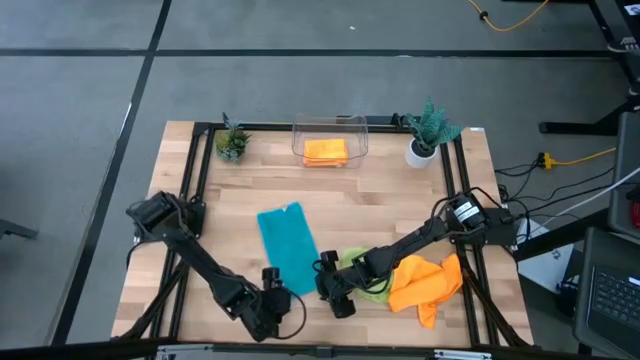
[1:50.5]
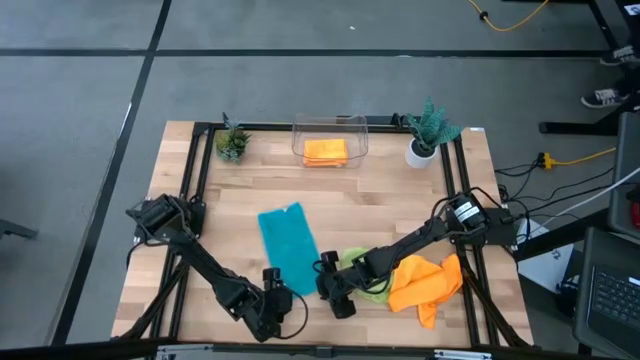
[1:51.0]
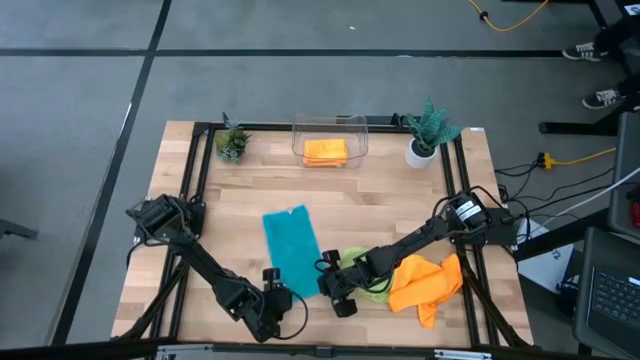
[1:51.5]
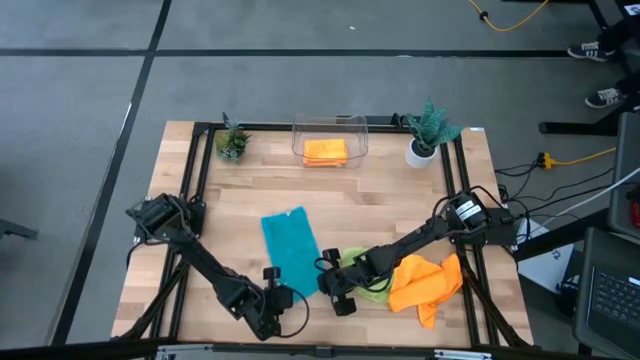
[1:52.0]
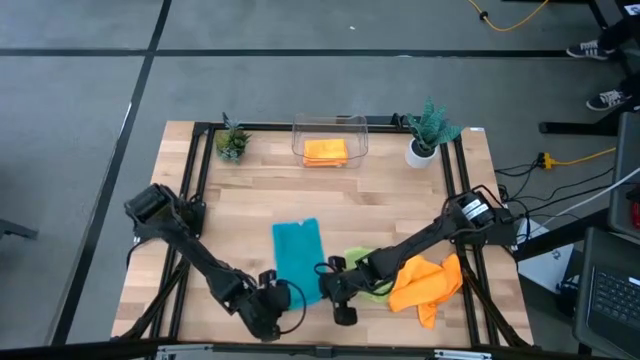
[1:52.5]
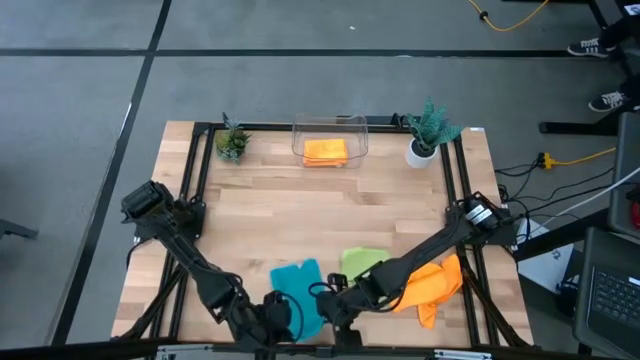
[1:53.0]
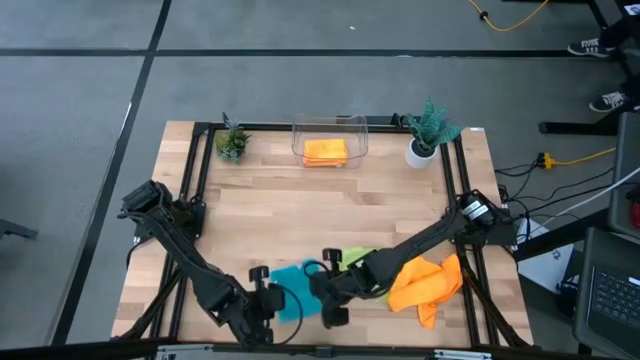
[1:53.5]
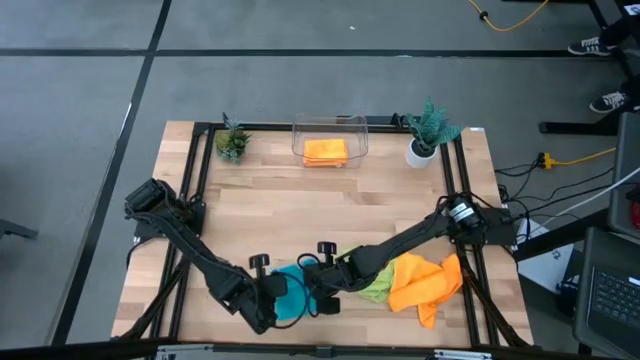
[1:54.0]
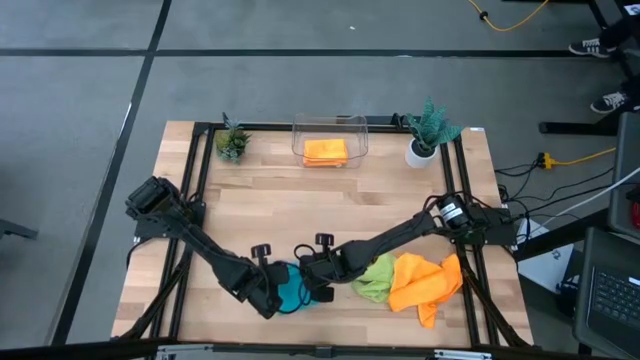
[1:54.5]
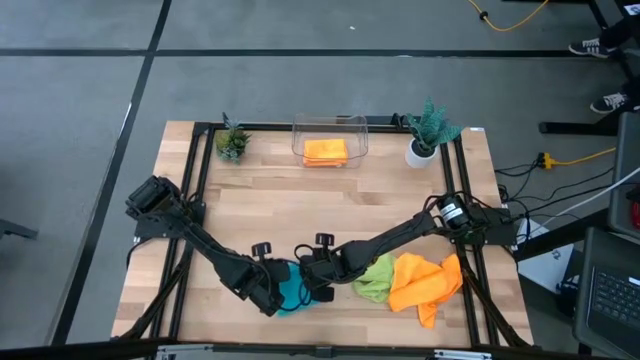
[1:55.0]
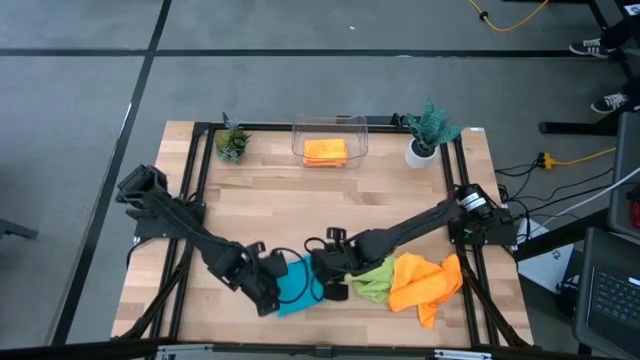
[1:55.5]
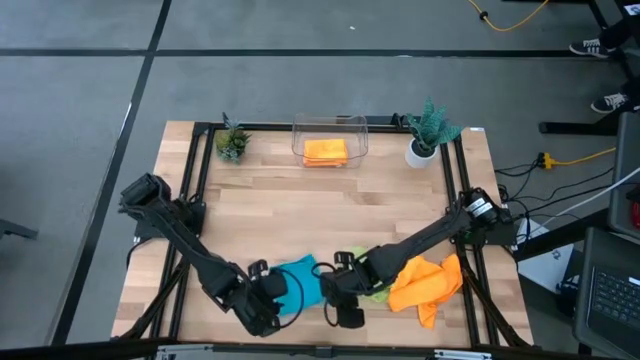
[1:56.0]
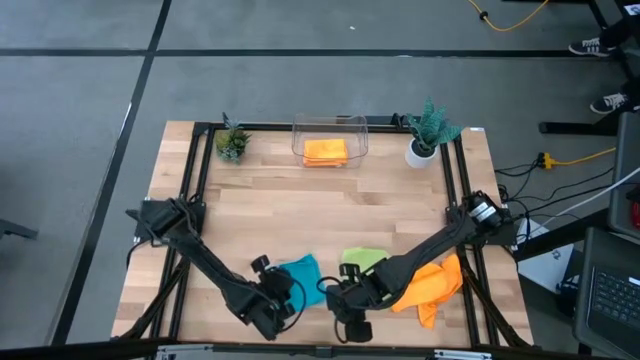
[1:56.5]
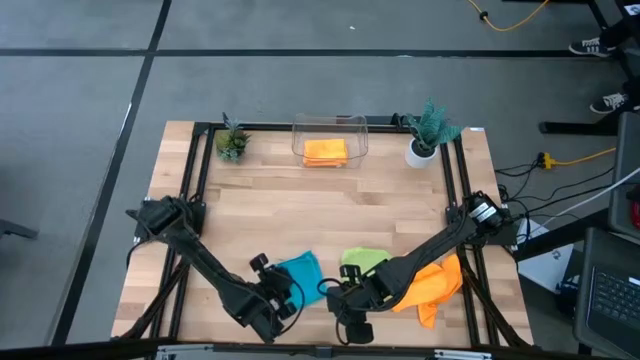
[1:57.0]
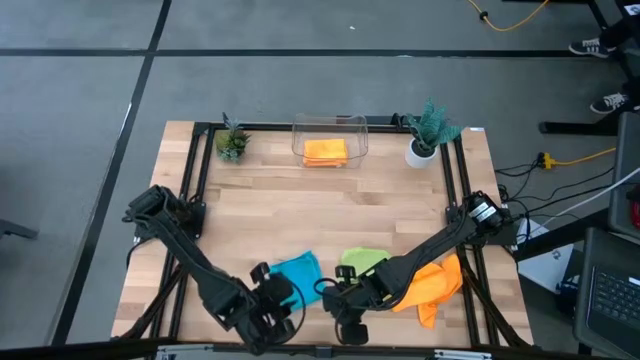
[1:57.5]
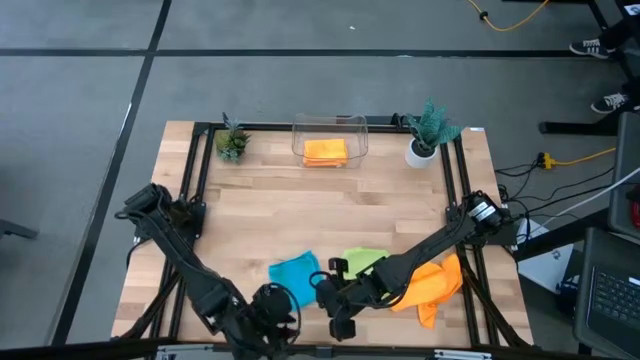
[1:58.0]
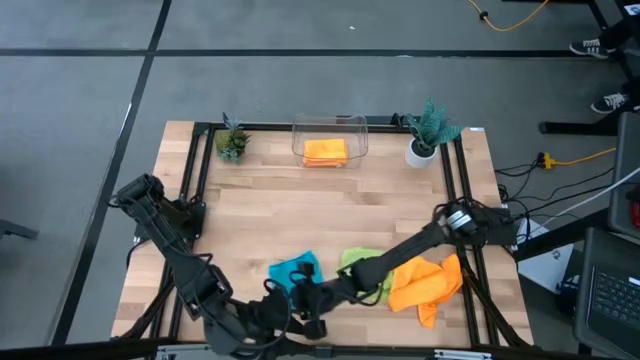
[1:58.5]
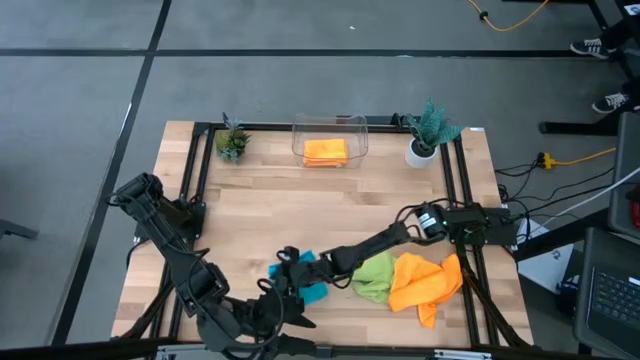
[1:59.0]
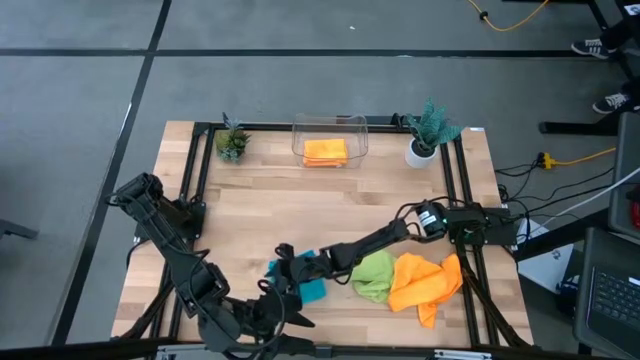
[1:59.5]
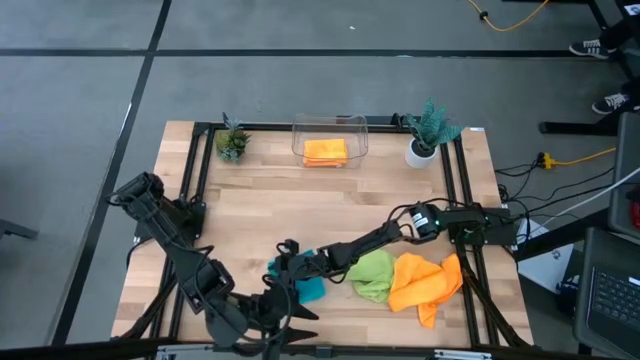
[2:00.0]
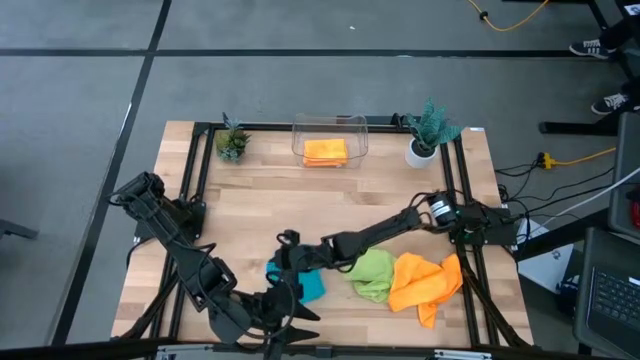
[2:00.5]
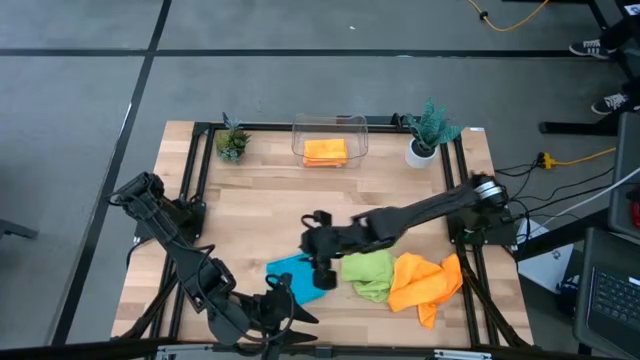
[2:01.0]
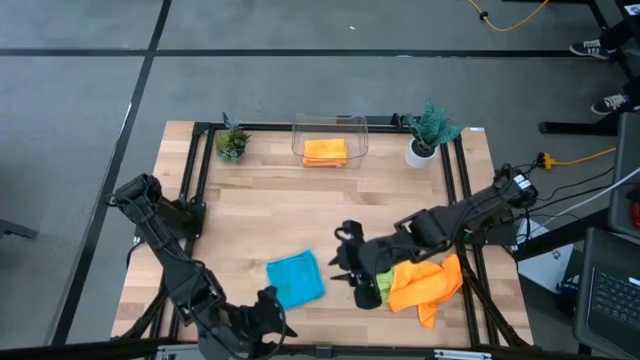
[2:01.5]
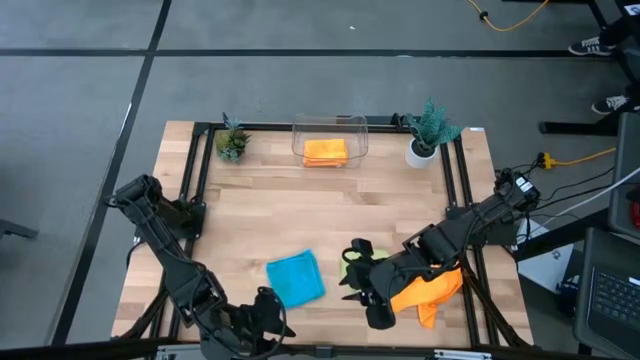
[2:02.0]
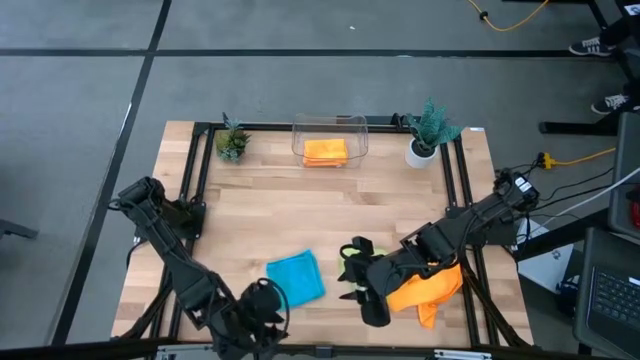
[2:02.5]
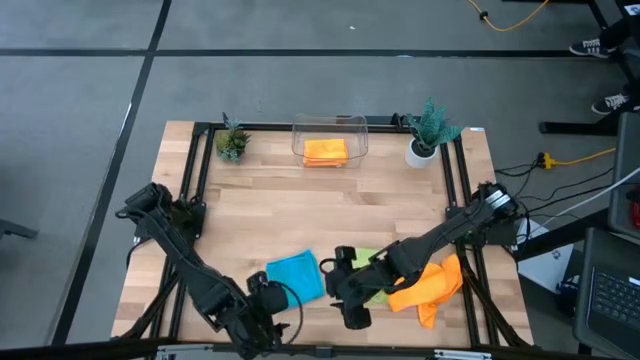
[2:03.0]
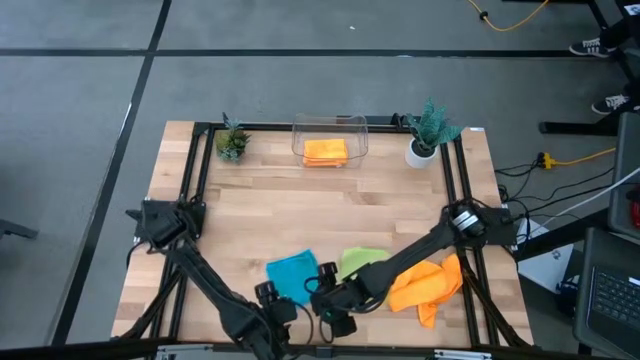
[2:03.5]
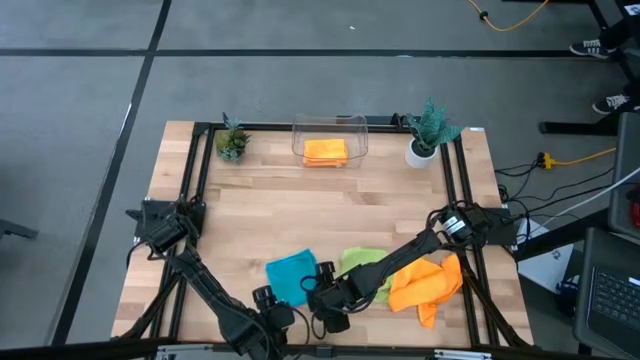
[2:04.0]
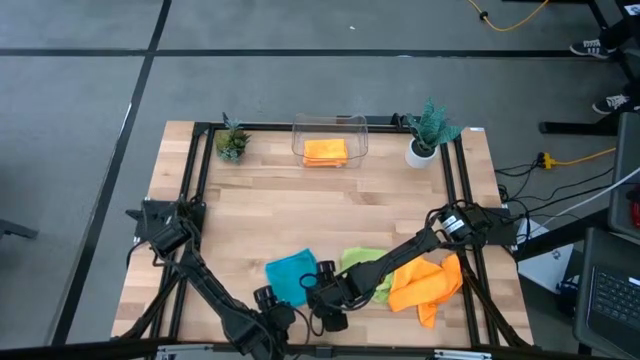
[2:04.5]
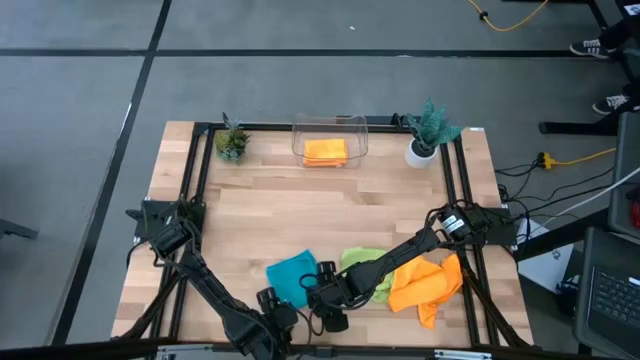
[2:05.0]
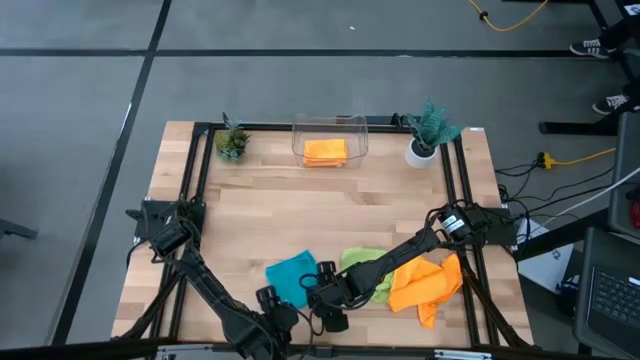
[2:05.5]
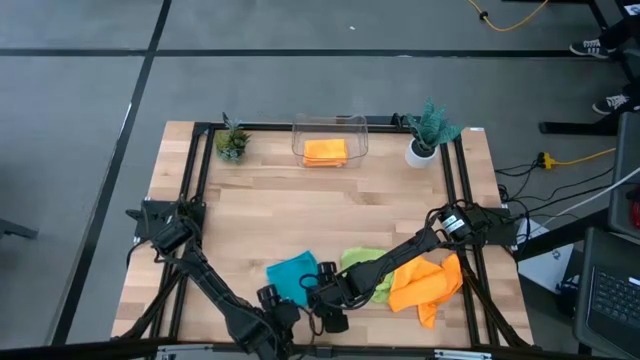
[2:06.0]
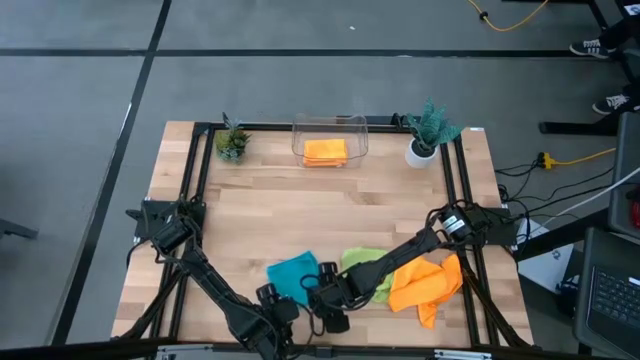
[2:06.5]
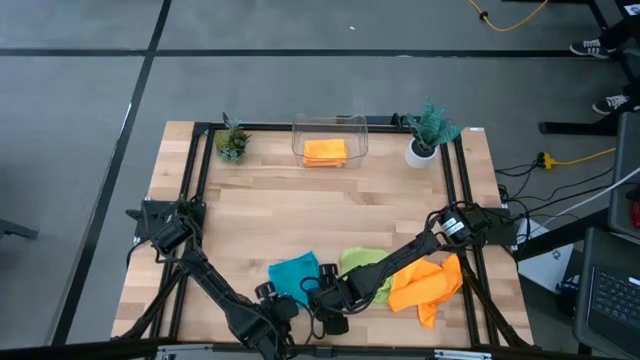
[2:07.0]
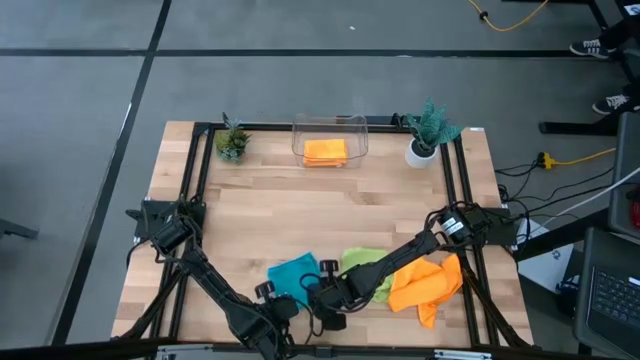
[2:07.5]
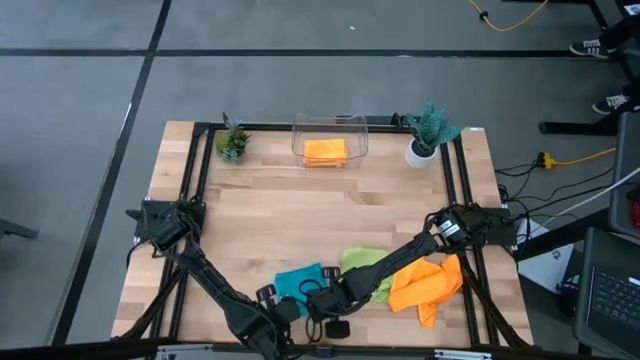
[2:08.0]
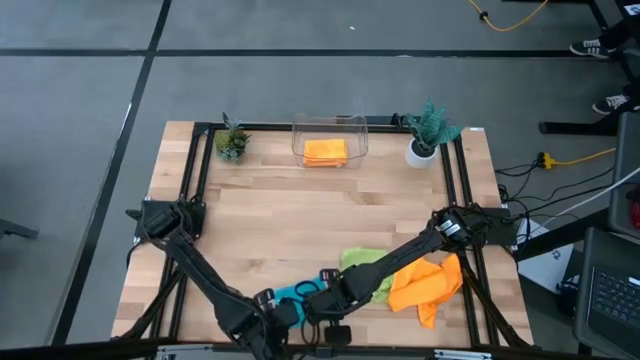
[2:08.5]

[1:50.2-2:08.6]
Task: Fold microfiber towels
Fold the blue towel

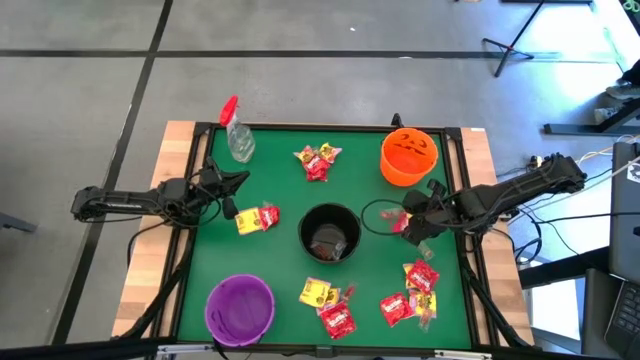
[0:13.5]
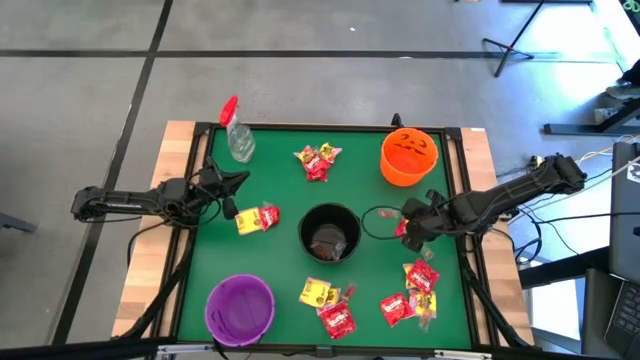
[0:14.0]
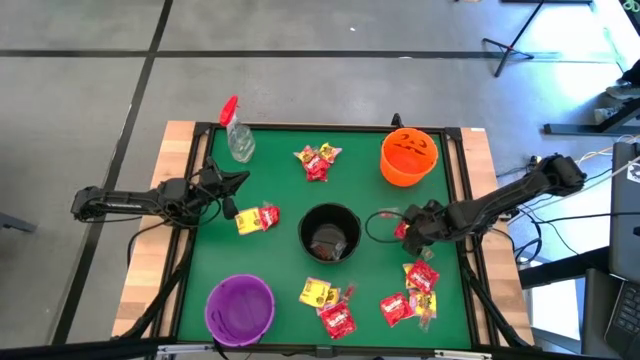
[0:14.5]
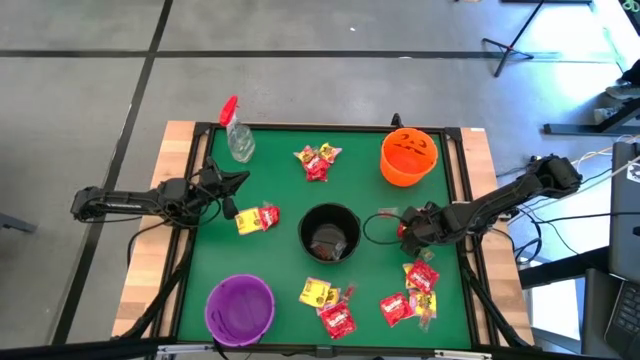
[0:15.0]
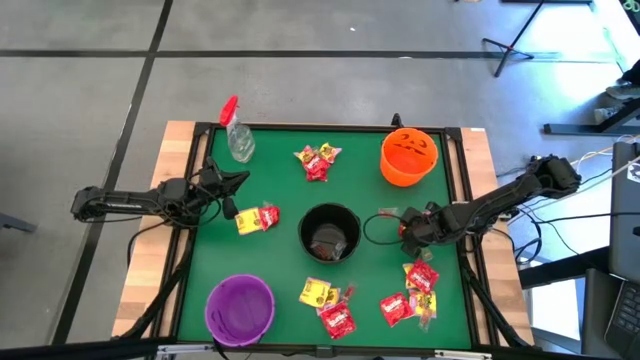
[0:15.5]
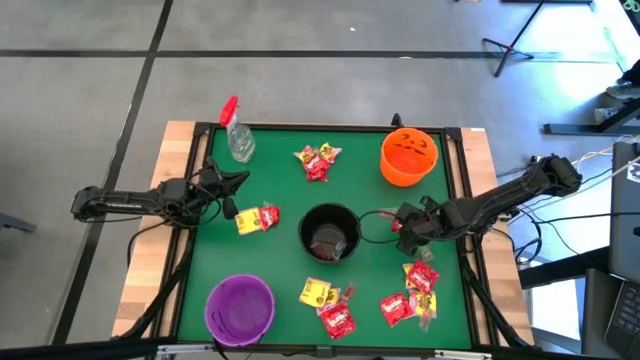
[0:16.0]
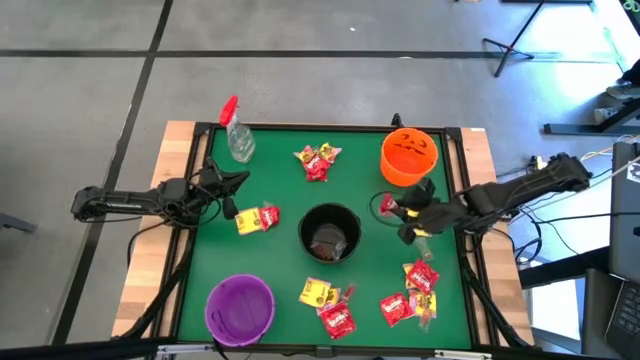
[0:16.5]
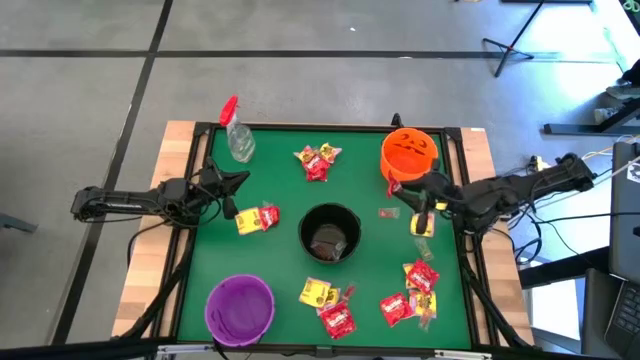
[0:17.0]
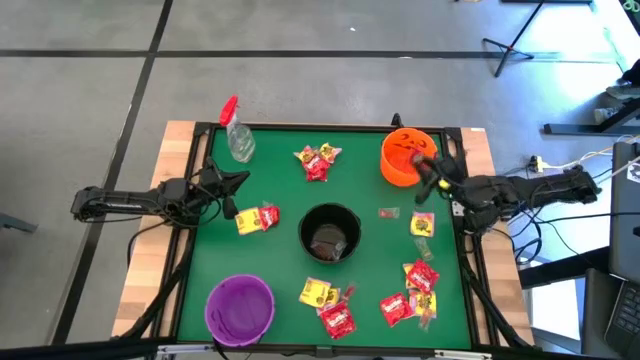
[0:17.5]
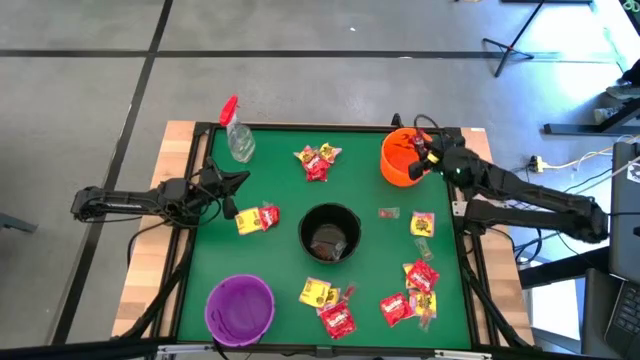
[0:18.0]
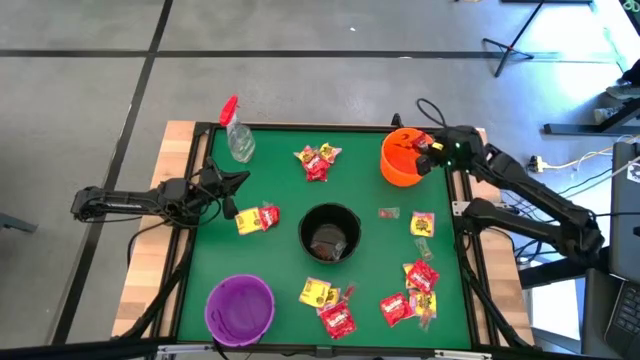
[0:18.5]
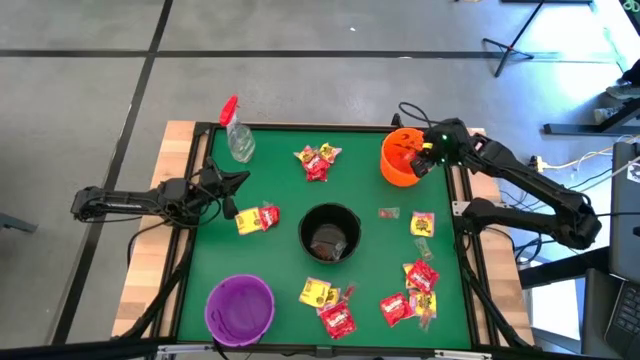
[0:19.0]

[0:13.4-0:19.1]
Task: Sort candy
Put the red candy into the orange bucket
